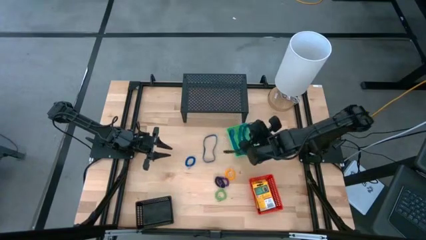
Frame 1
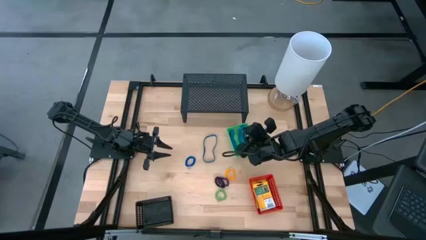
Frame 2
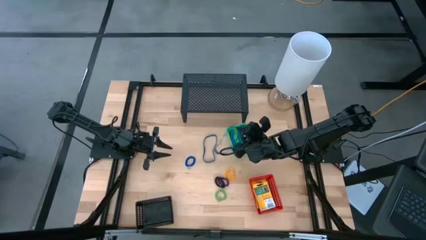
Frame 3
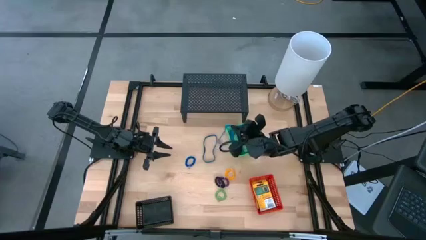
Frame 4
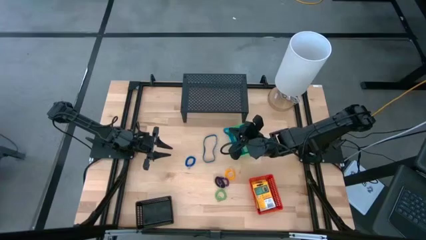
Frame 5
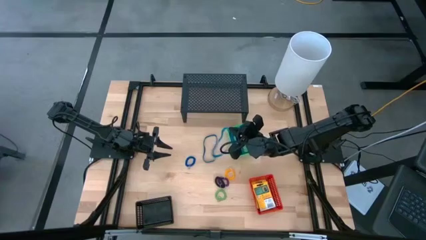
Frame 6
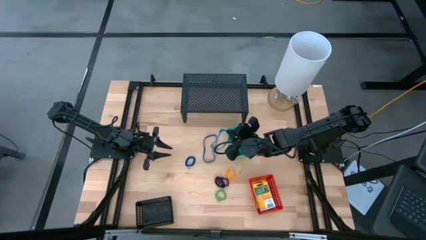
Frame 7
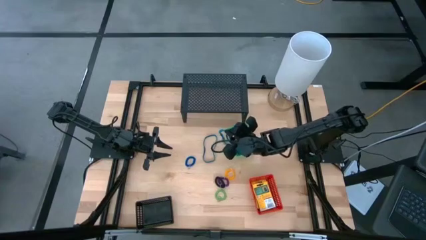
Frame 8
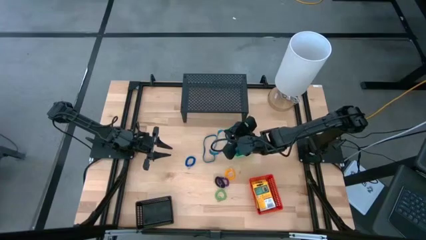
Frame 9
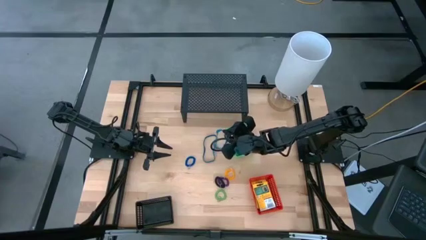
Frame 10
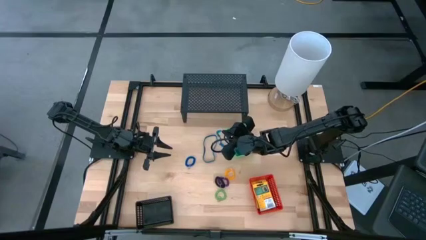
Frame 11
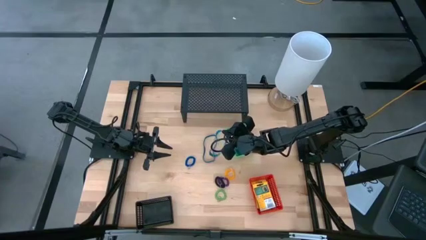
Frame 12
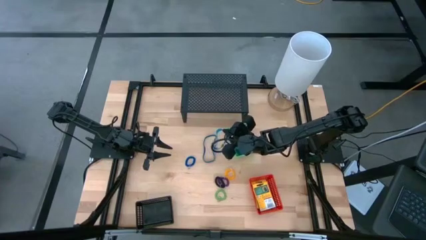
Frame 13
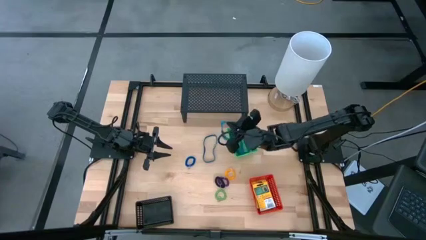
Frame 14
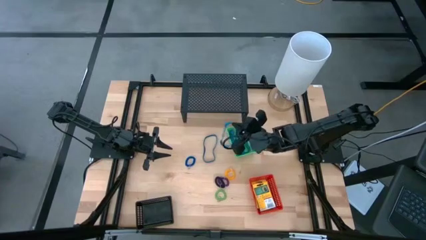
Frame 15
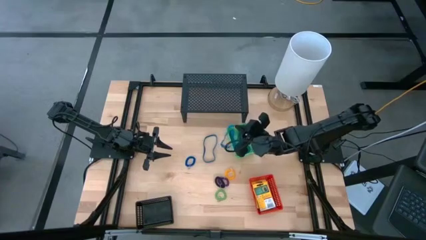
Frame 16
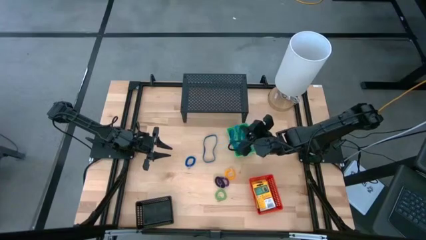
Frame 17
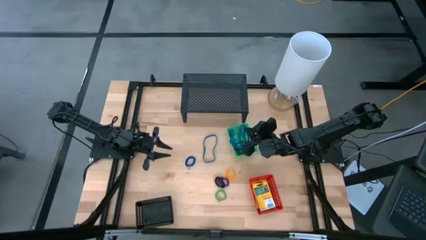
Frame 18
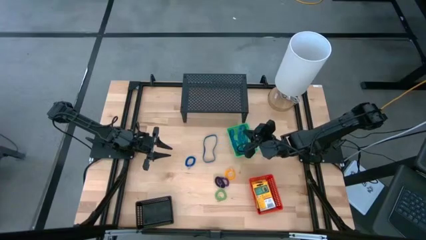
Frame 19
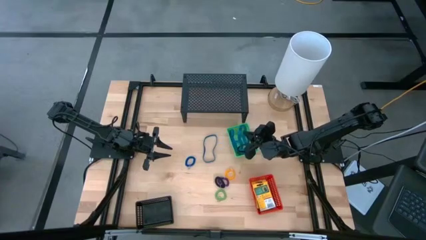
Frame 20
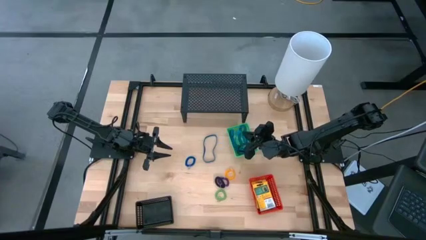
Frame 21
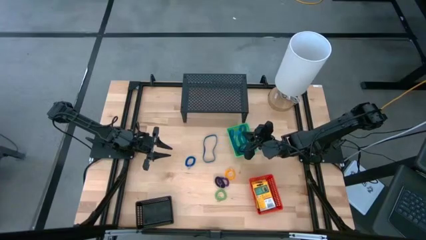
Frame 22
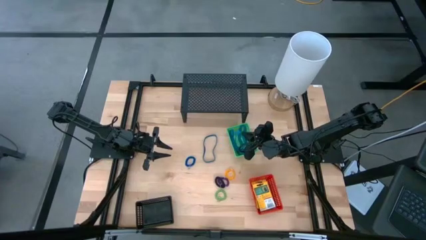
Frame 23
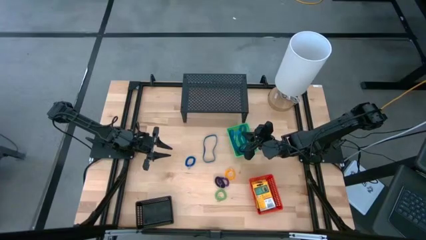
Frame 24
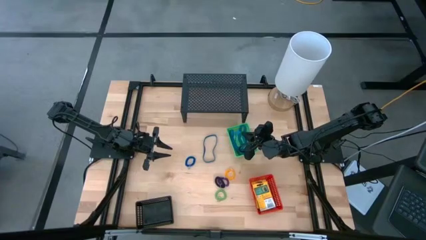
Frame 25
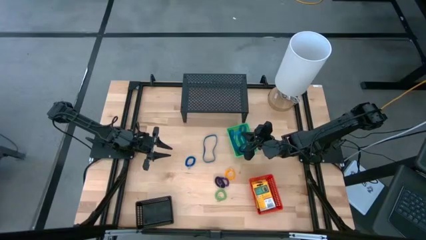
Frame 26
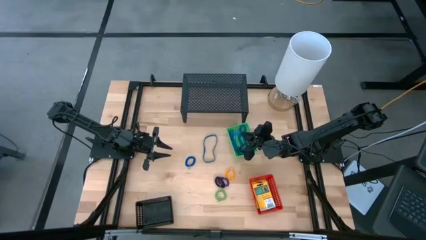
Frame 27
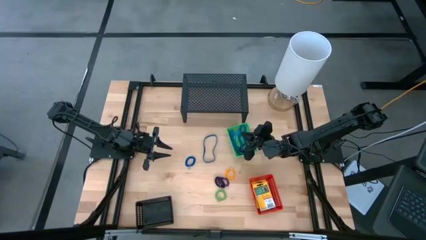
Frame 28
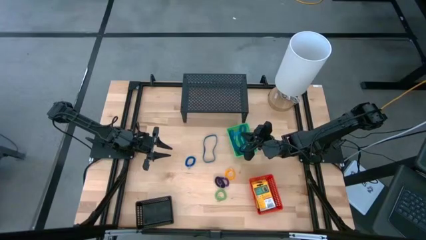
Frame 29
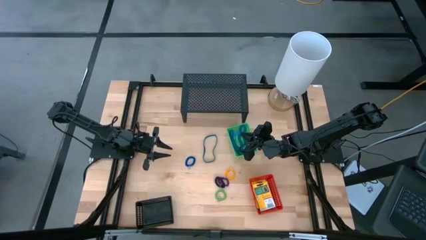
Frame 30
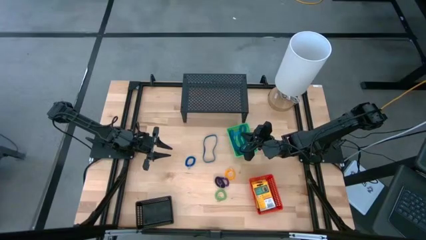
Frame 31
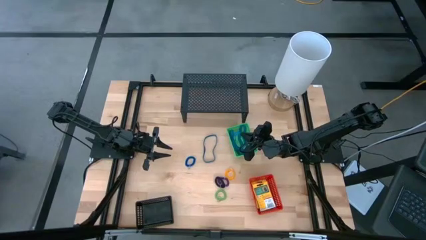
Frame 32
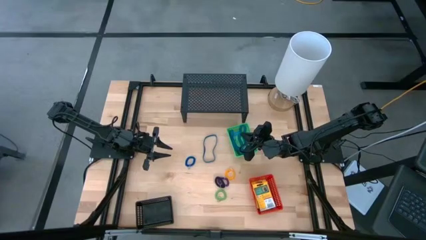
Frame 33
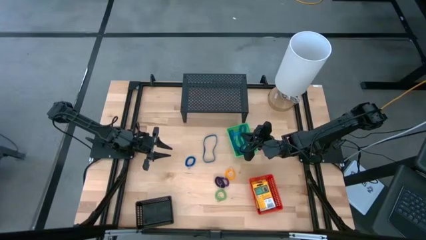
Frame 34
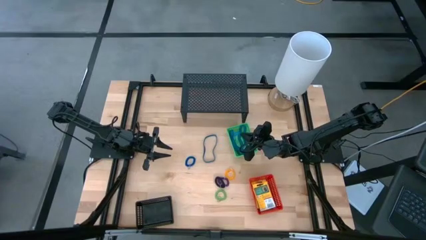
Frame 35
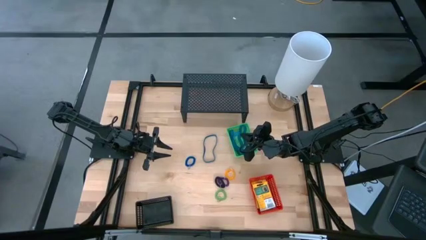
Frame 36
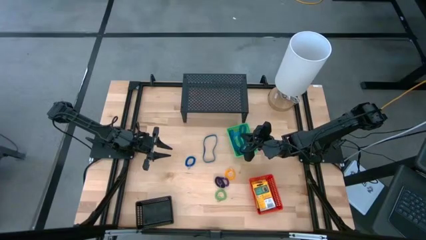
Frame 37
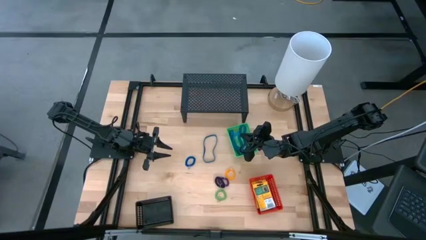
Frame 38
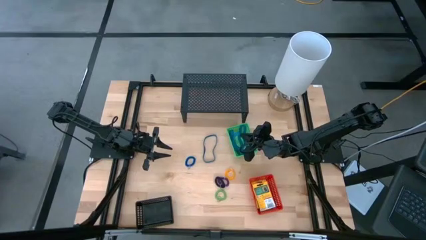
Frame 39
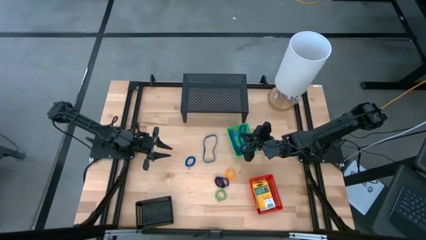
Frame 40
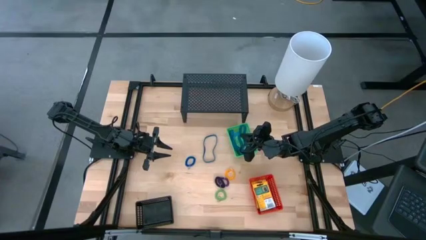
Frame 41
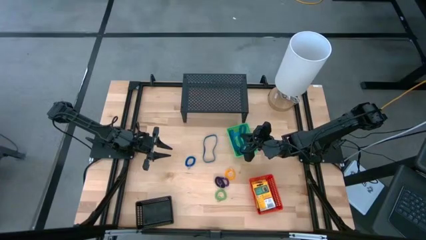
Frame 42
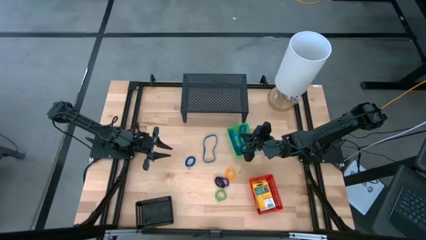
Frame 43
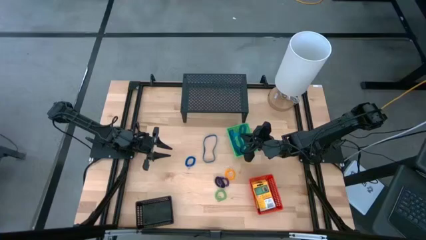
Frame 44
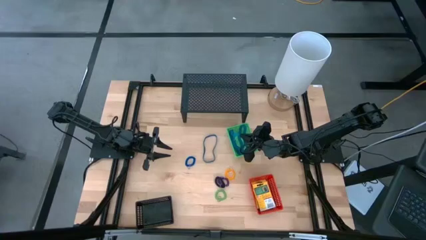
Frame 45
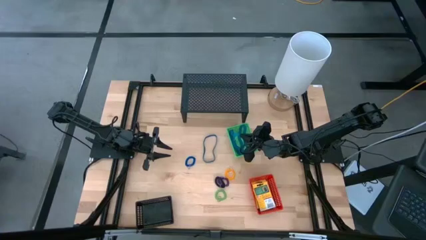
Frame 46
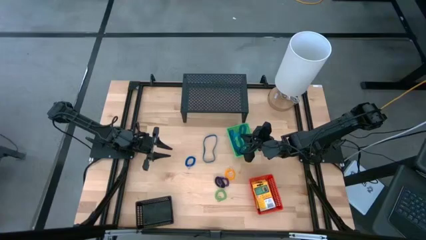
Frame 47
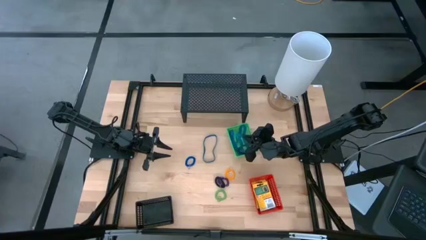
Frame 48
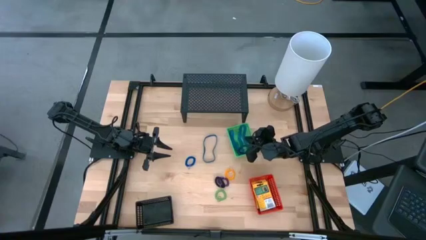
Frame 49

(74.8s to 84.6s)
Task: Pick & Place Office Desk Supplies
Put the blue rubber band into the green basket

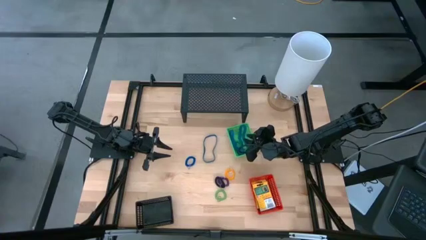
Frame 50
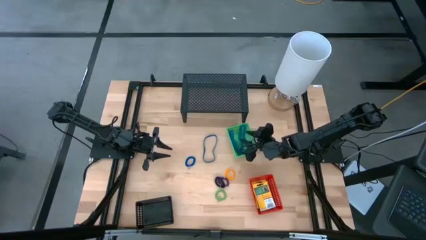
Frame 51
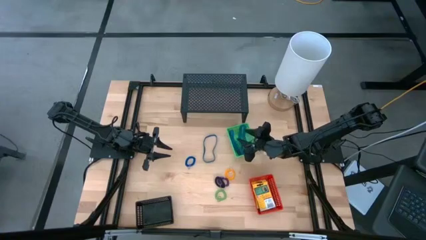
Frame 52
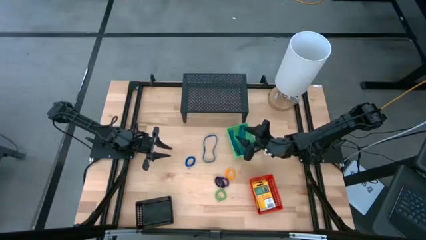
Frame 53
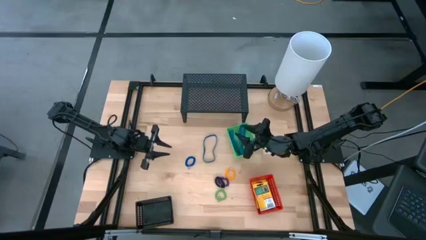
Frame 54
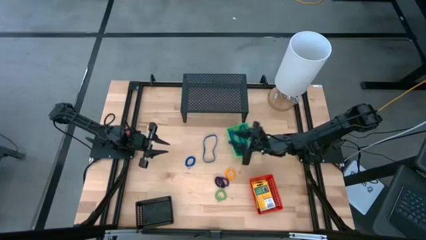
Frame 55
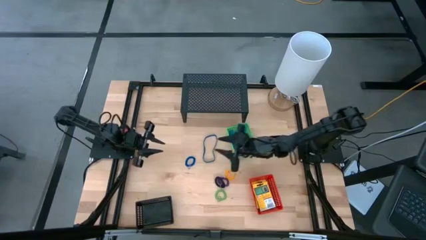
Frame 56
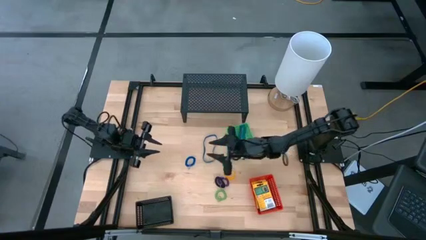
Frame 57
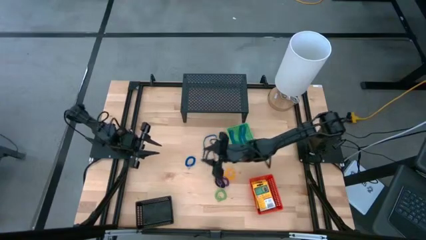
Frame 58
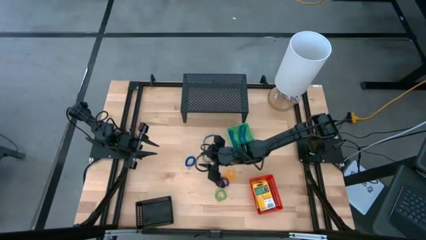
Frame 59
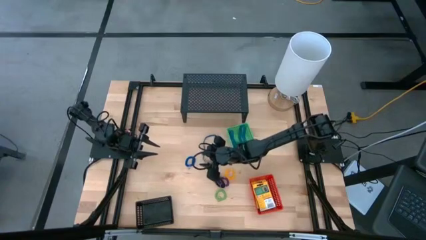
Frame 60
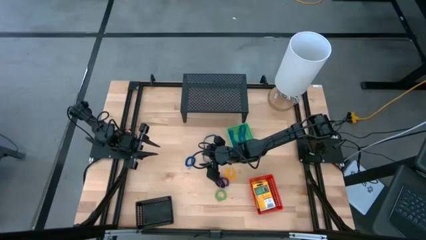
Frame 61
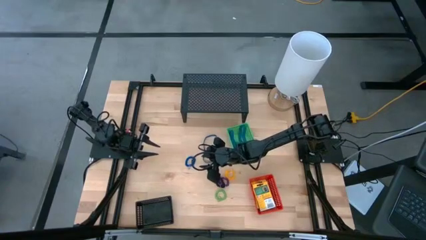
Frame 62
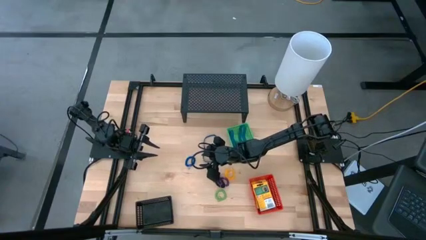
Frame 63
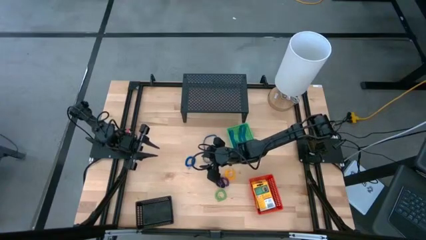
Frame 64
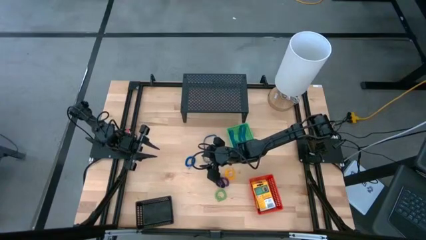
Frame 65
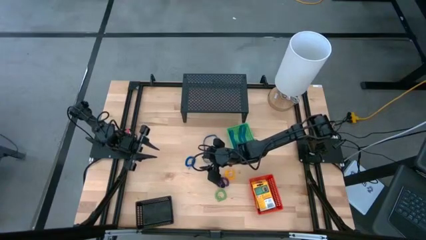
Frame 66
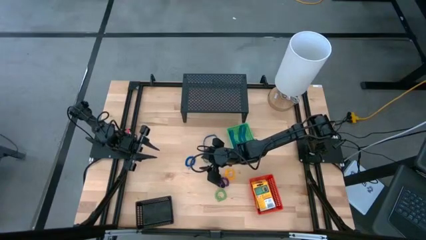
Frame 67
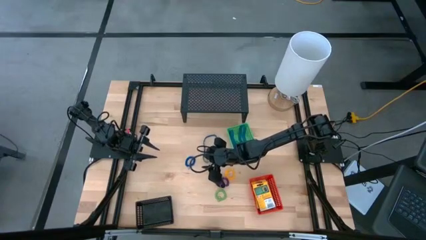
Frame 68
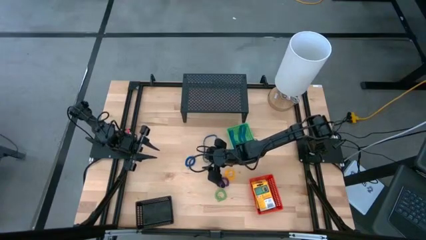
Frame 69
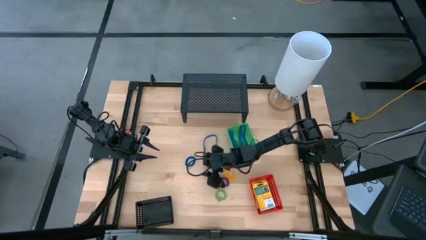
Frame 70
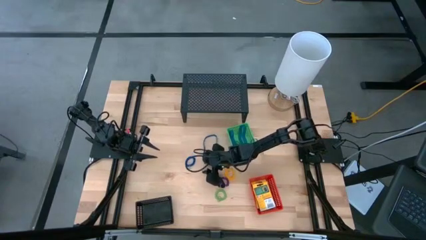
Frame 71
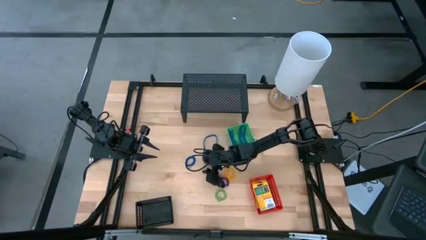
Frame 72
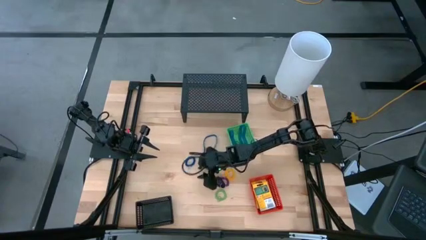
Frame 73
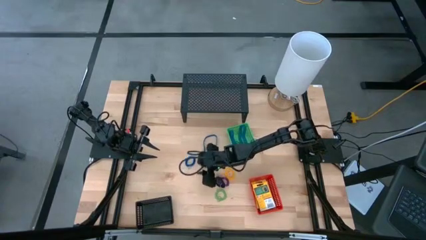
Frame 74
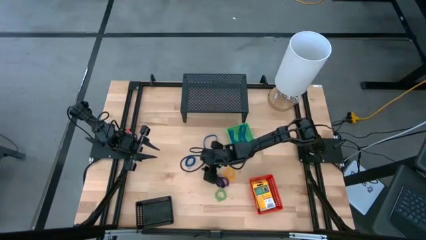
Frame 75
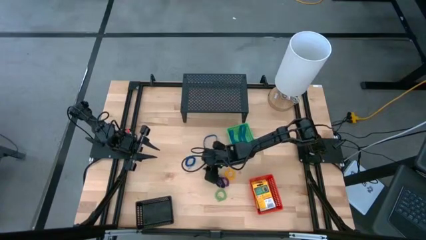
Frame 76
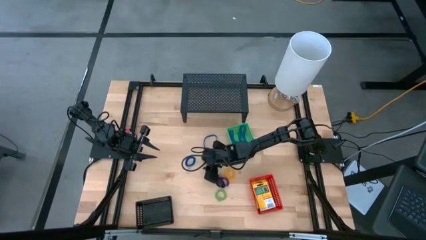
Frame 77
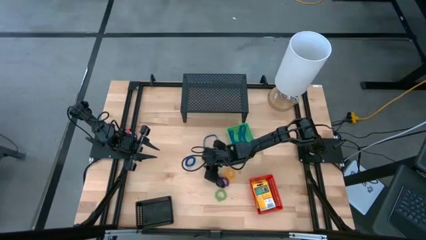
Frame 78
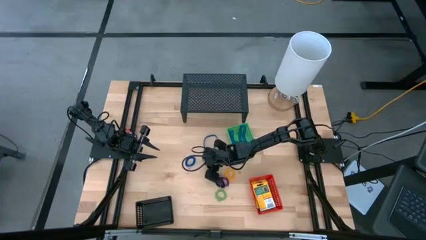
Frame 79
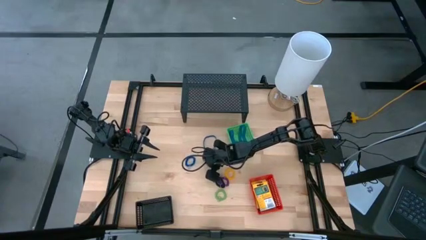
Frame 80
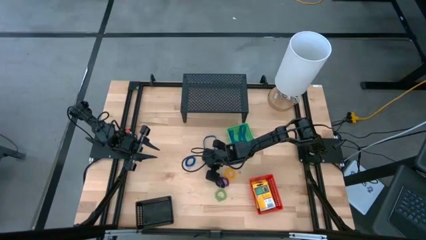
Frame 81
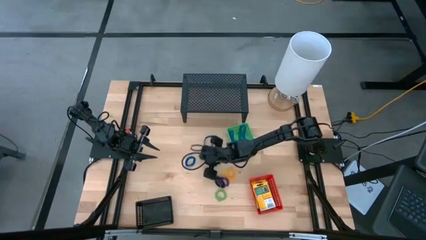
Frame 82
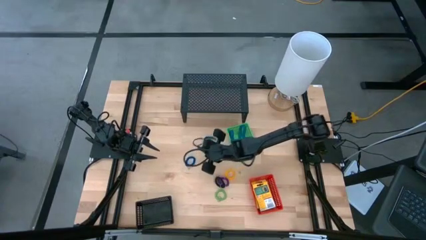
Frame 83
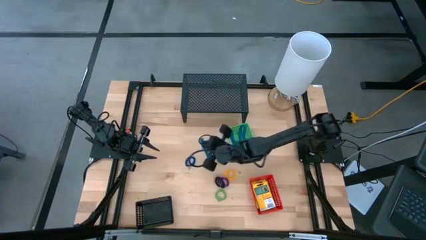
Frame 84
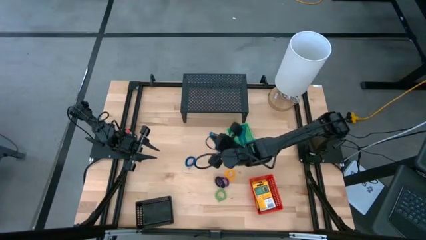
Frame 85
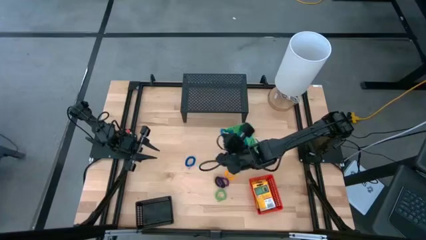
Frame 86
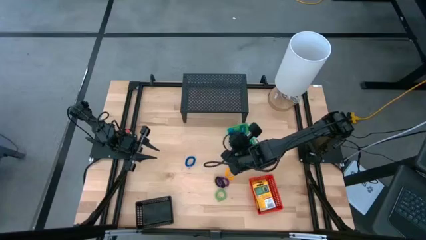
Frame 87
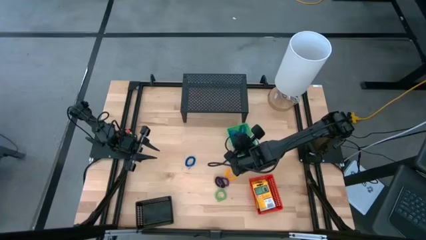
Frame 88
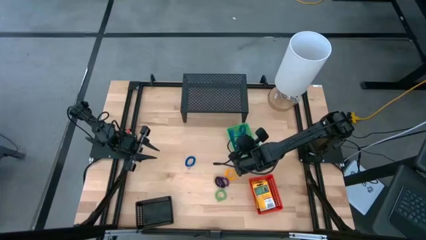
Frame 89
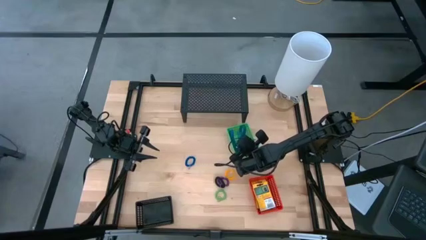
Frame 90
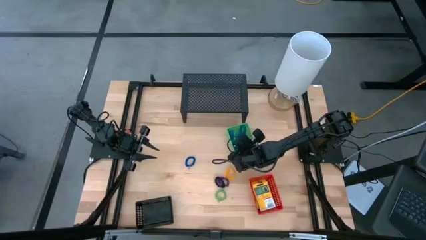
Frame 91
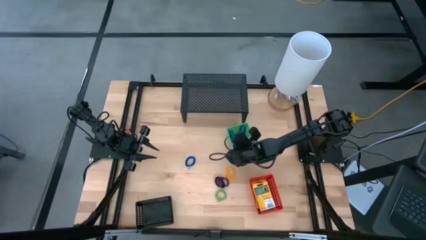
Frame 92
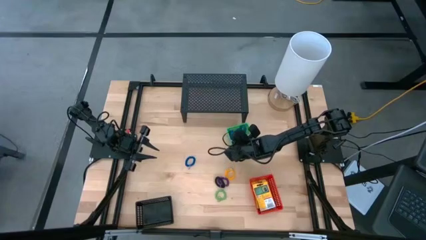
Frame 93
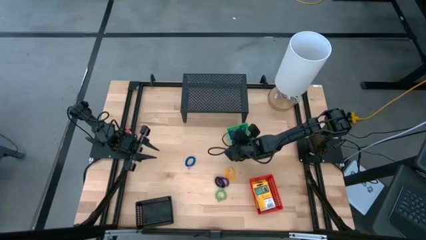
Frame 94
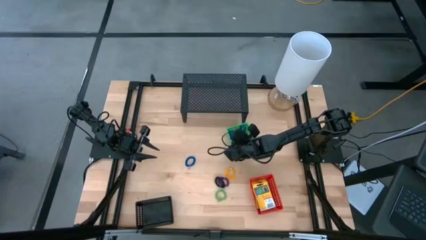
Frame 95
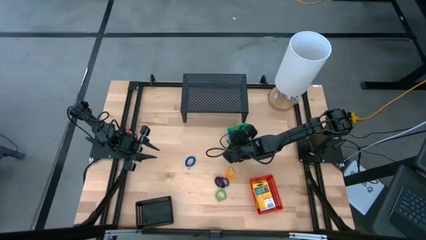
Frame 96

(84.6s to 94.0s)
Put the blue rubber band into the green basket
